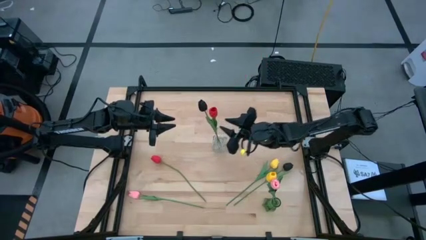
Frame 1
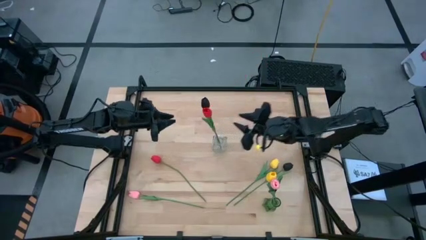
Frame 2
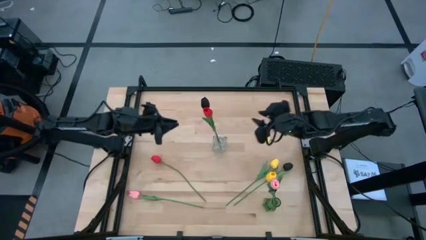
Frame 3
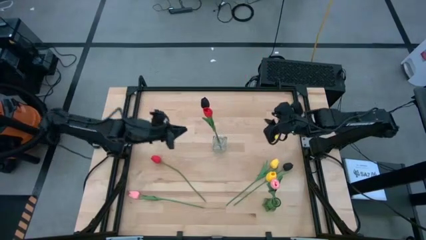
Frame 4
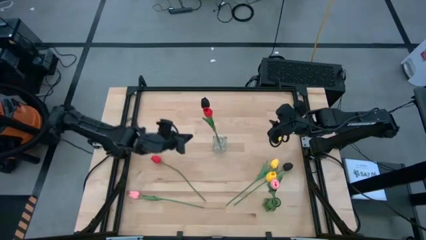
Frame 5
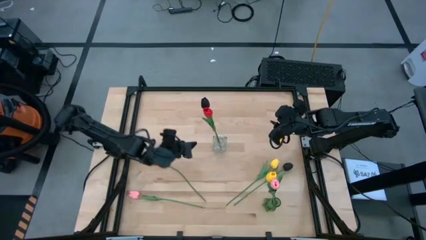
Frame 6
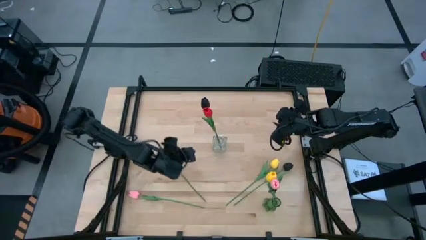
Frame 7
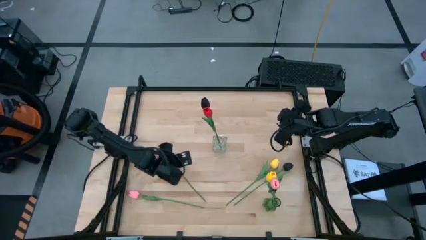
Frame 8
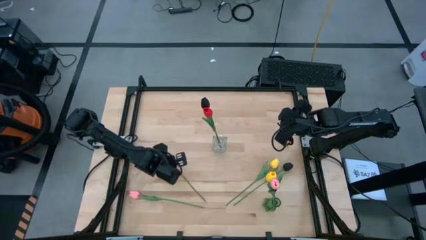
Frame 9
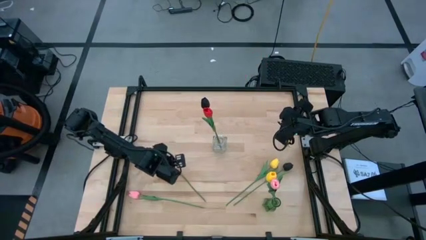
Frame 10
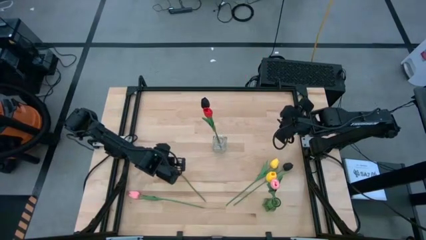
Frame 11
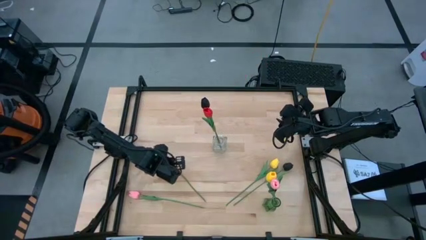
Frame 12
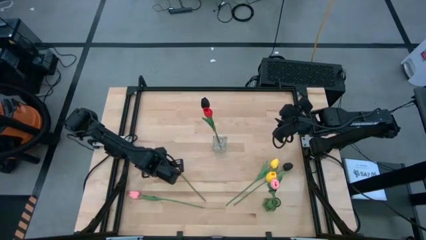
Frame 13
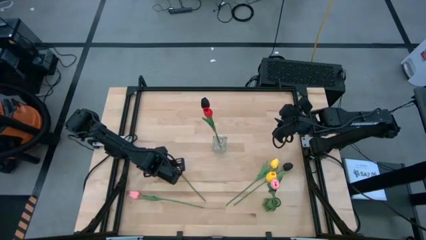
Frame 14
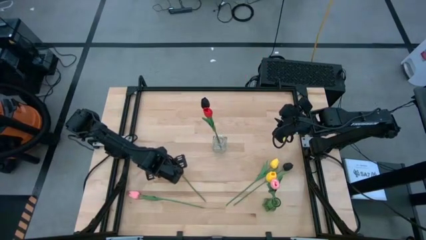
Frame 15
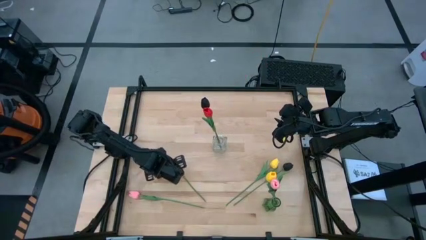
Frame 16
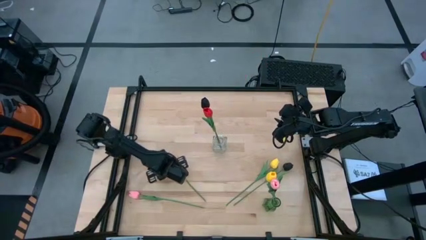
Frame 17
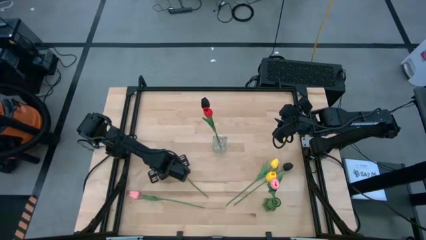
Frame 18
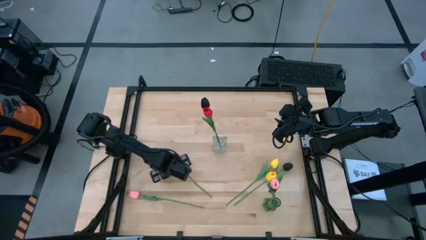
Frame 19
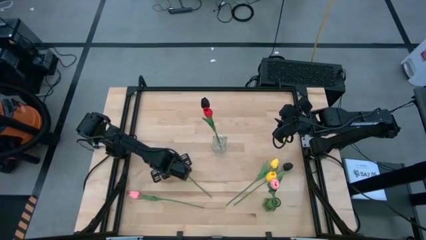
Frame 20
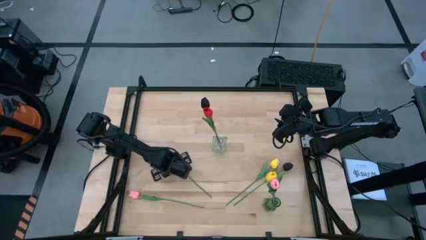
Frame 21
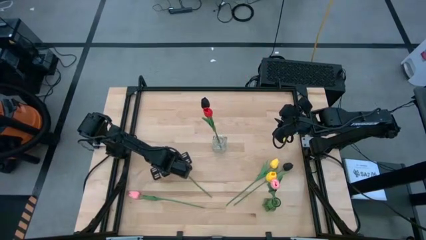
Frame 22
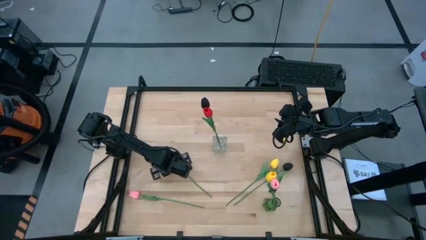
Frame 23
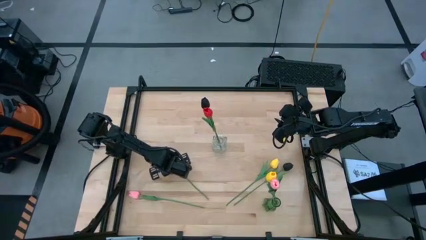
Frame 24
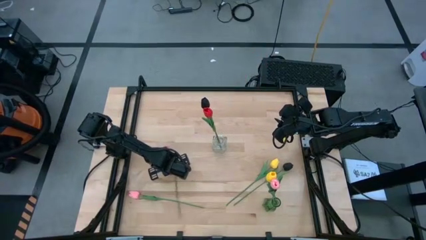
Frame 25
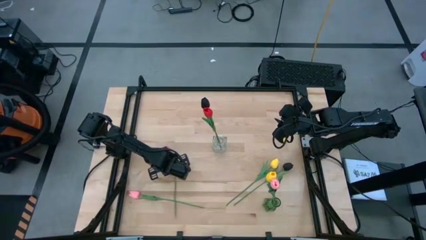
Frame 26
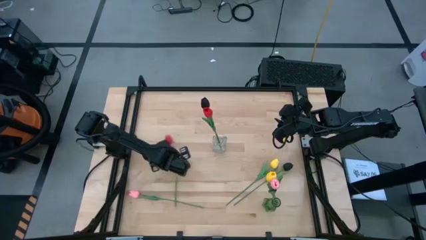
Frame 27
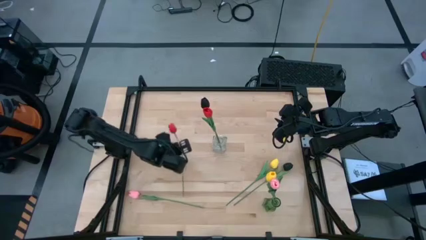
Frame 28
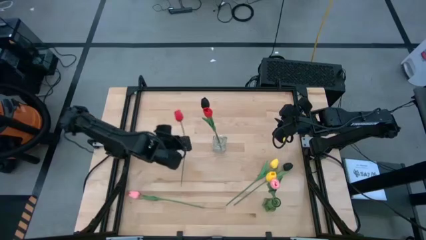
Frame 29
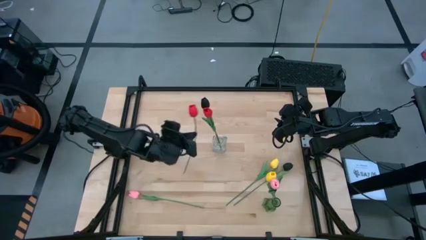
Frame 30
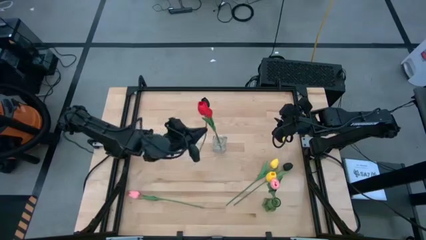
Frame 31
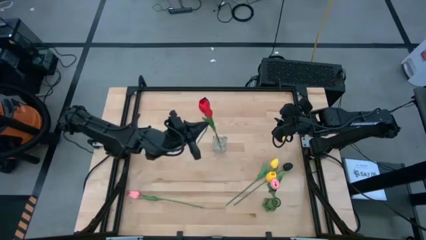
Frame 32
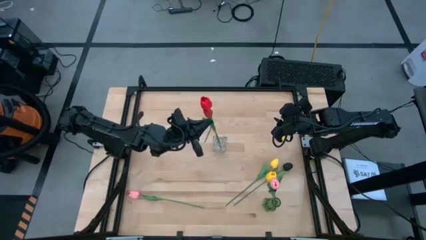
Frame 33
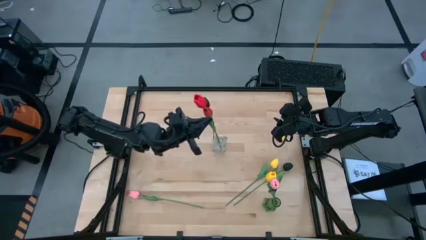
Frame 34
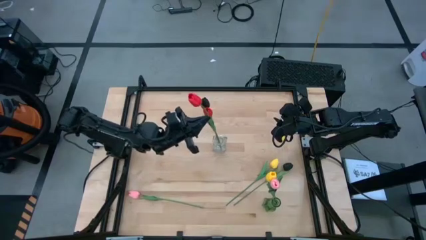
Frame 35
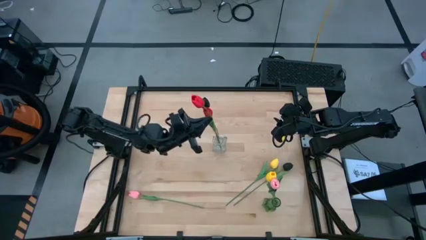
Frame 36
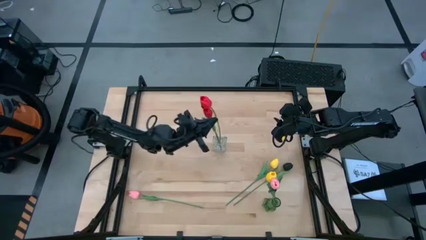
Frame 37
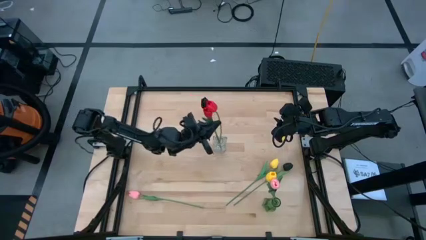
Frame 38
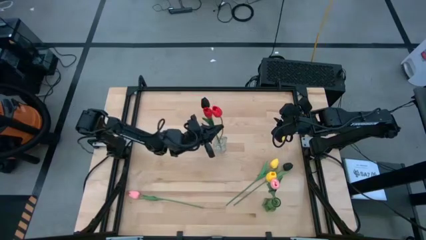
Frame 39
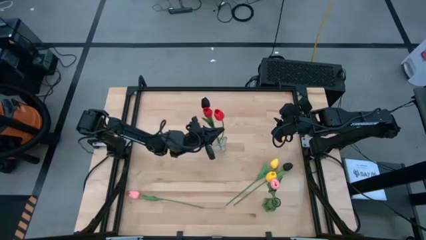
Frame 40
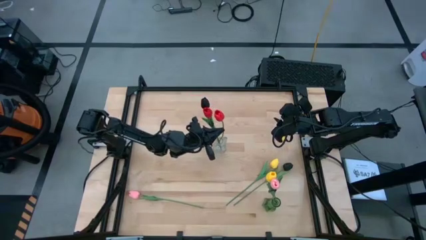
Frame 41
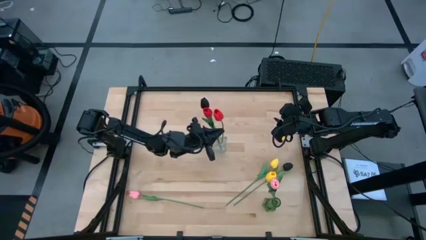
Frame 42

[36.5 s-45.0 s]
Task: Sort flowers into vase by color
Put the red flower into the transparent vase

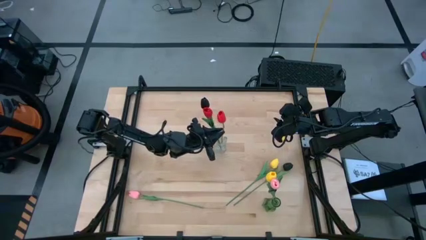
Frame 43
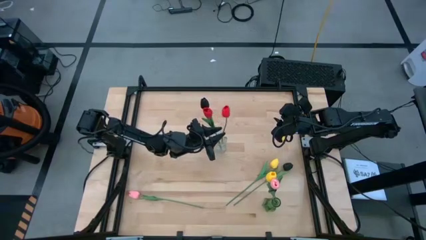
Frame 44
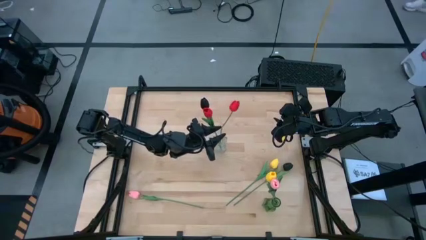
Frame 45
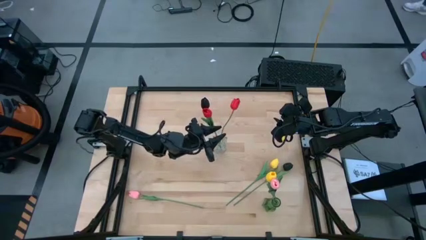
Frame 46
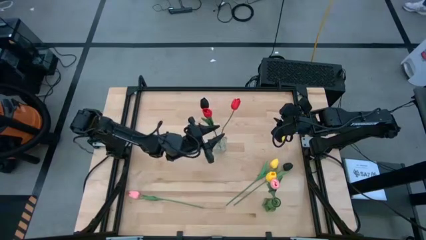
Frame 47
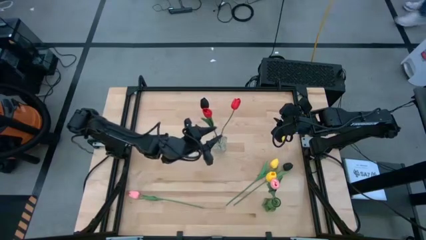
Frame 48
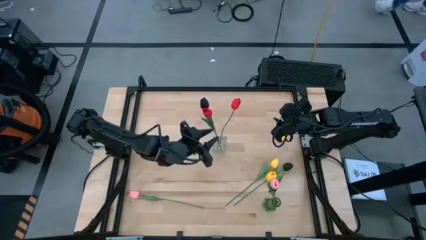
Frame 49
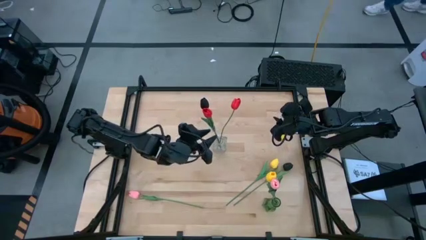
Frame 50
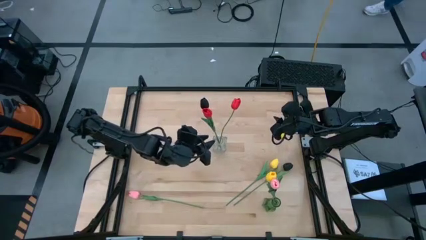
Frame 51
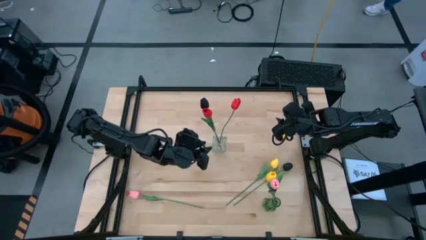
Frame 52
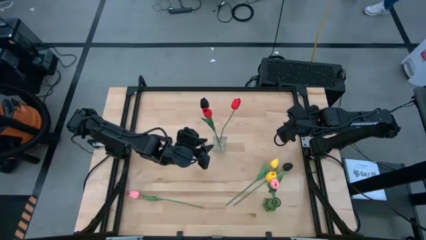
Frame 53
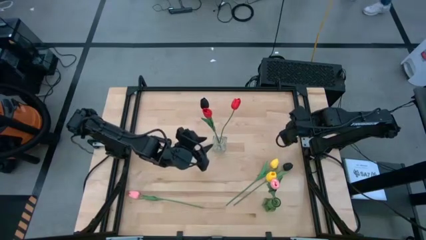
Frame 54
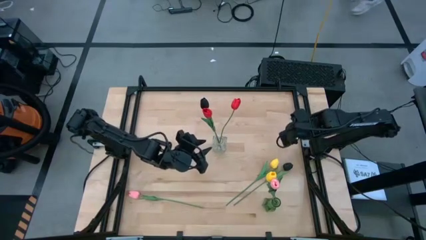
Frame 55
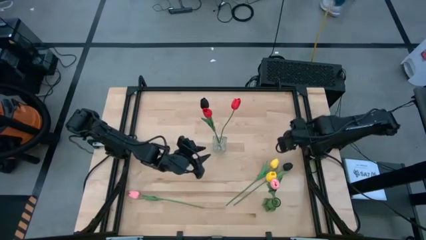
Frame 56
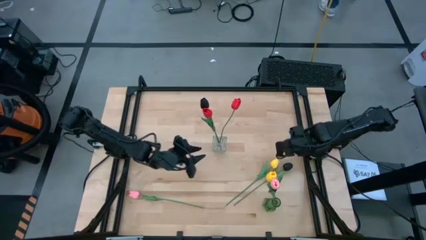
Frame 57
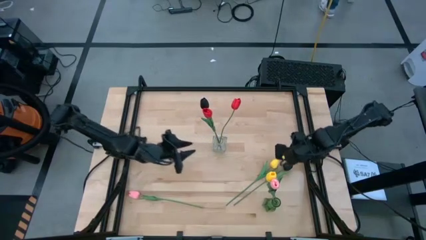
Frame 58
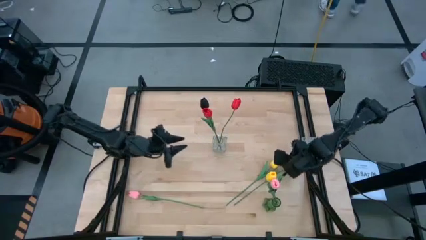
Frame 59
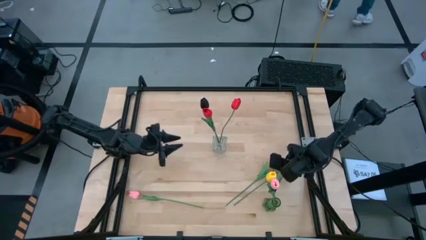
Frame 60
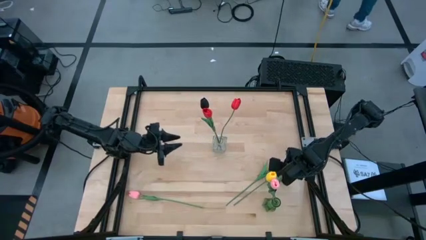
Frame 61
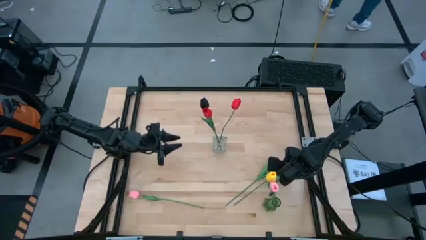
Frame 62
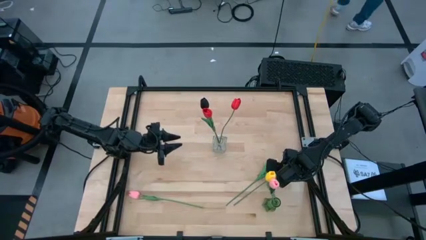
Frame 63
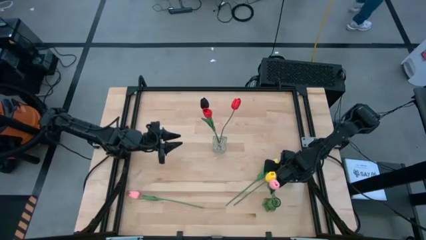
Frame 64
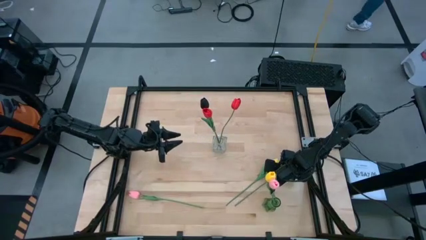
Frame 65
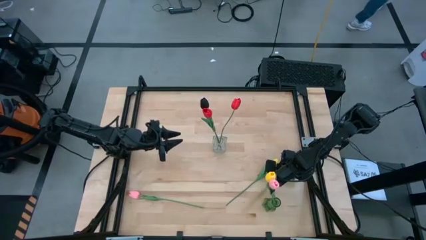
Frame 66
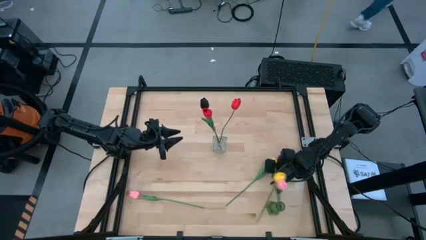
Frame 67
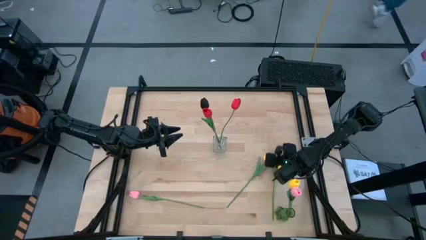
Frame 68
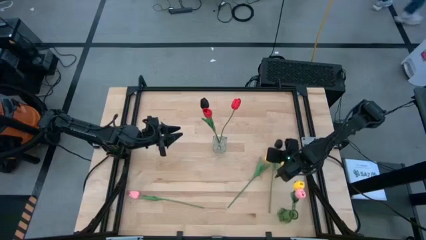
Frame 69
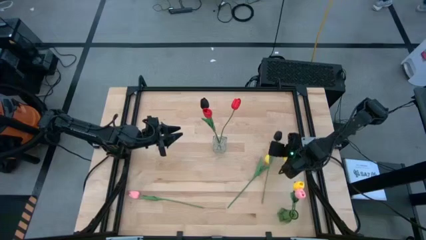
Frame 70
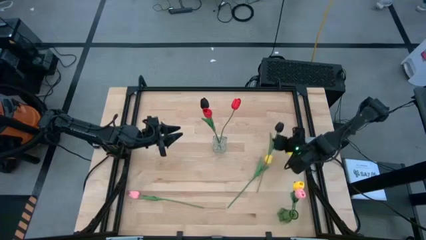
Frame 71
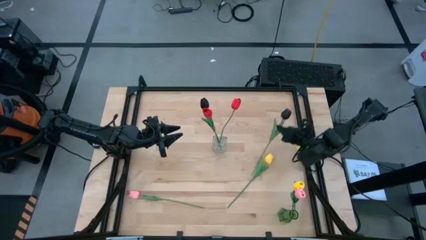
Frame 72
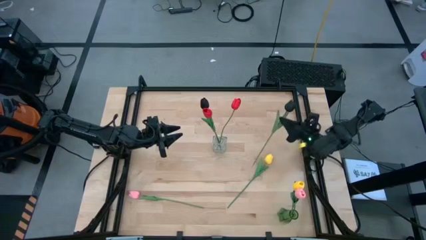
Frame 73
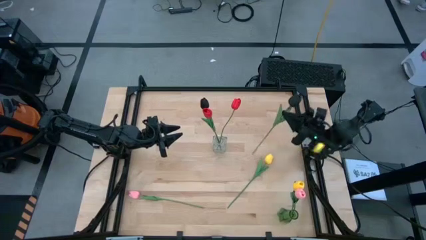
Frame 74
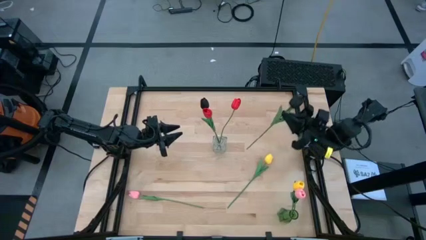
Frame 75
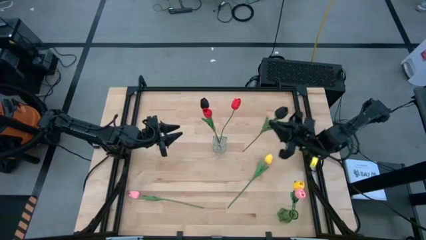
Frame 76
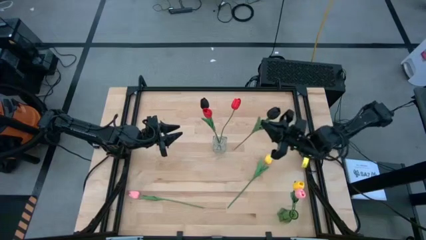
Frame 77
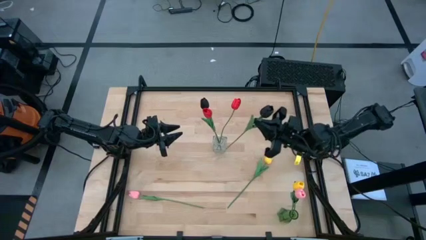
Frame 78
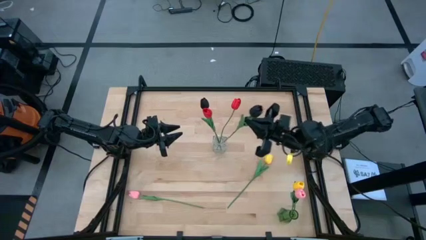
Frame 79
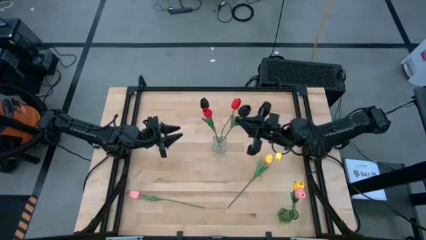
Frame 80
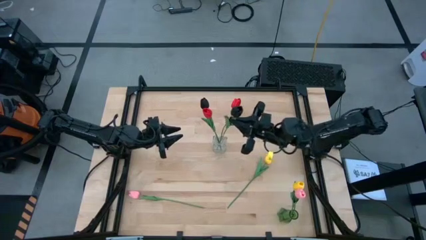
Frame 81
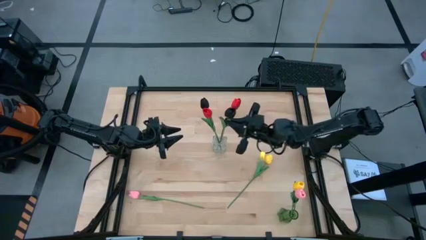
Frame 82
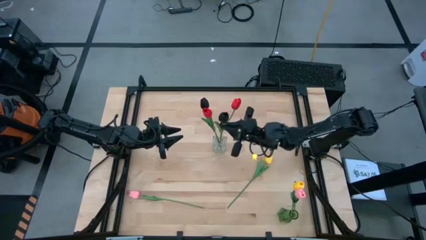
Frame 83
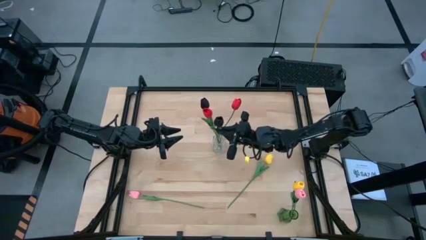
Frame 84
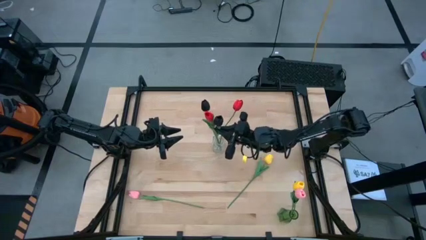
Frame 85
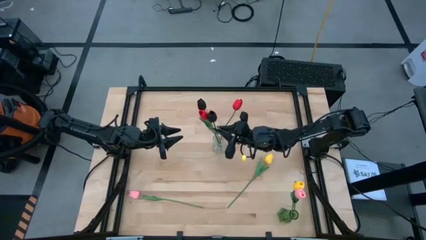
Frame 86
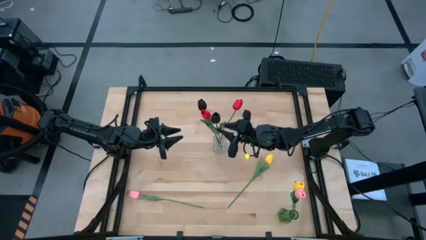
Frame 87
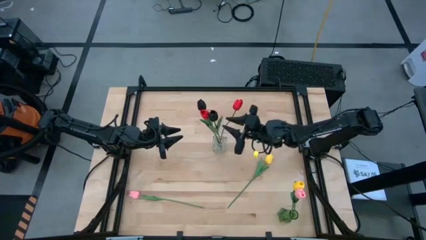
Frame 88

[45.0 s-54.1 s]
Put the black flower into the transparent vase
